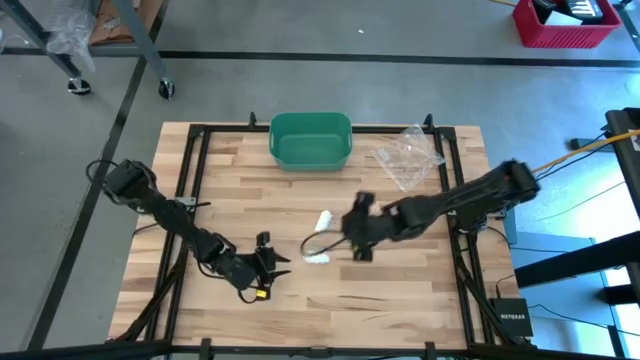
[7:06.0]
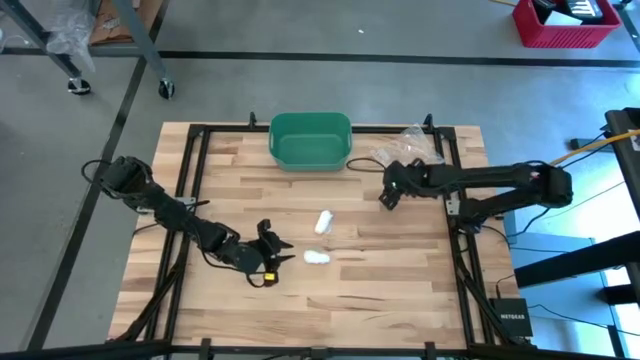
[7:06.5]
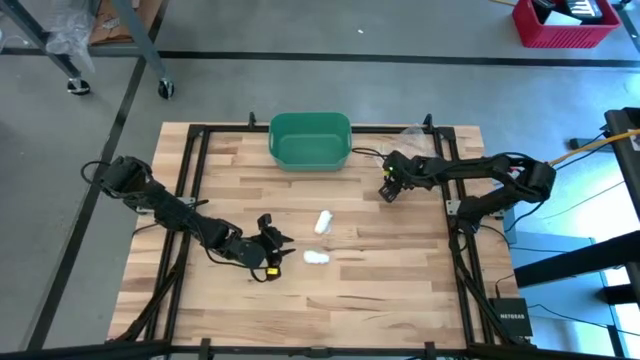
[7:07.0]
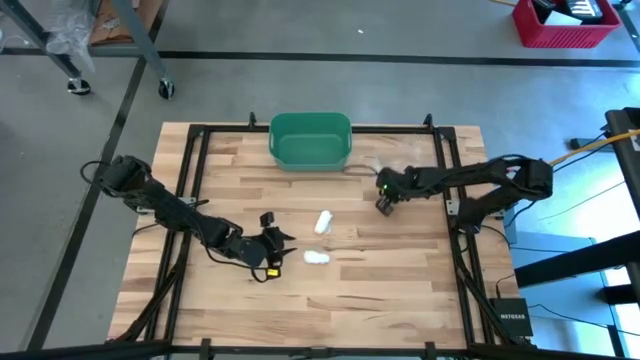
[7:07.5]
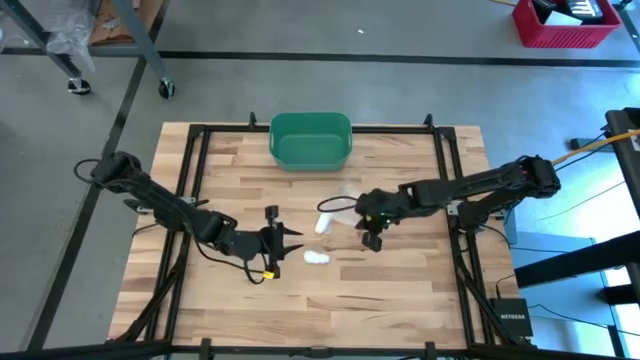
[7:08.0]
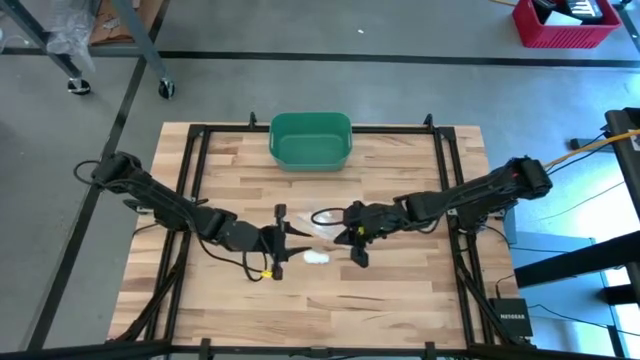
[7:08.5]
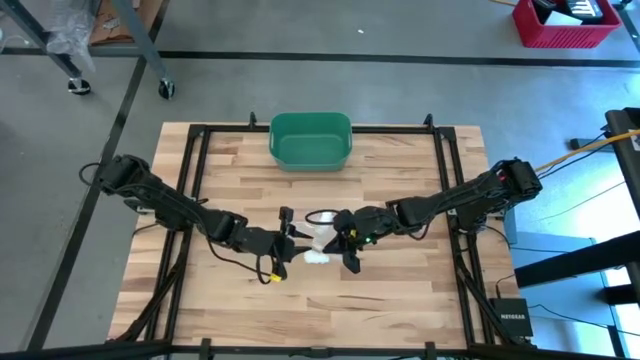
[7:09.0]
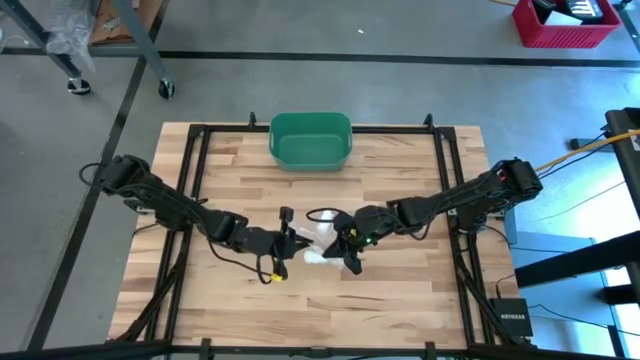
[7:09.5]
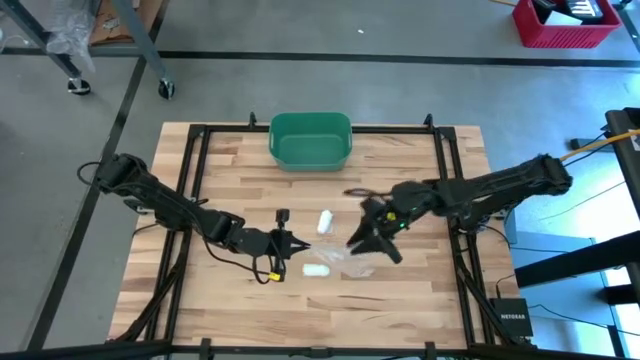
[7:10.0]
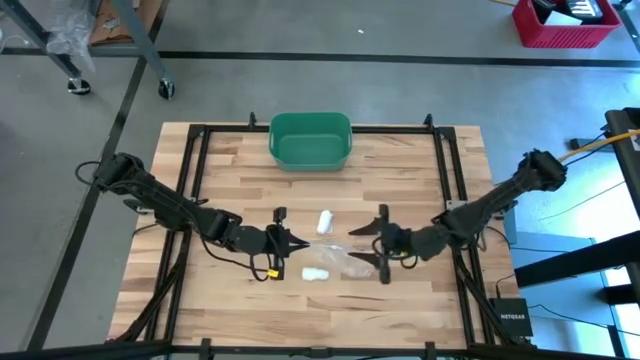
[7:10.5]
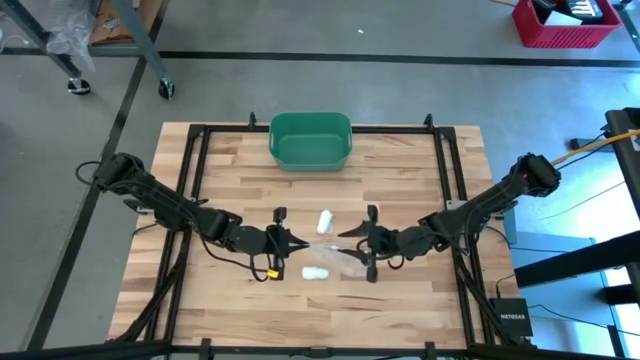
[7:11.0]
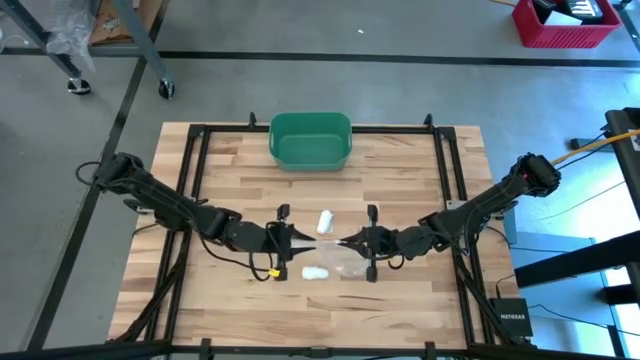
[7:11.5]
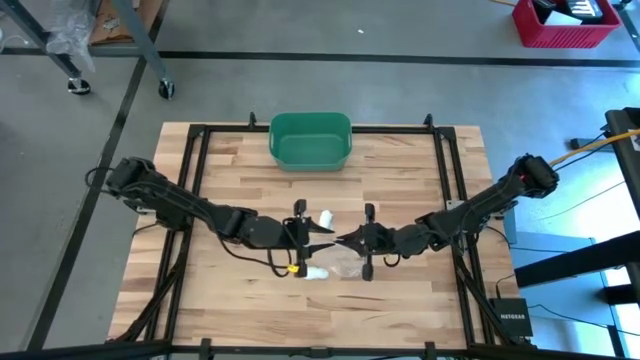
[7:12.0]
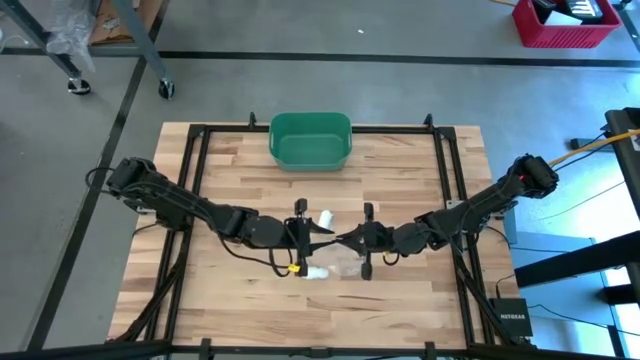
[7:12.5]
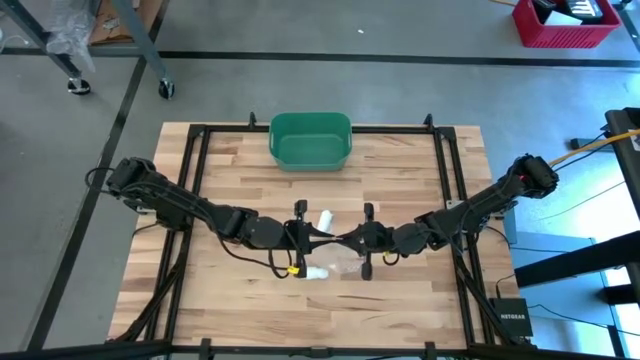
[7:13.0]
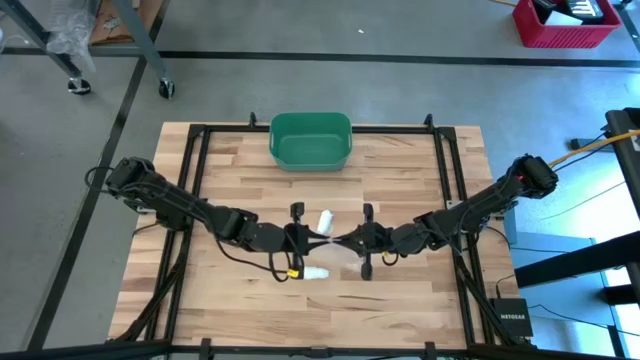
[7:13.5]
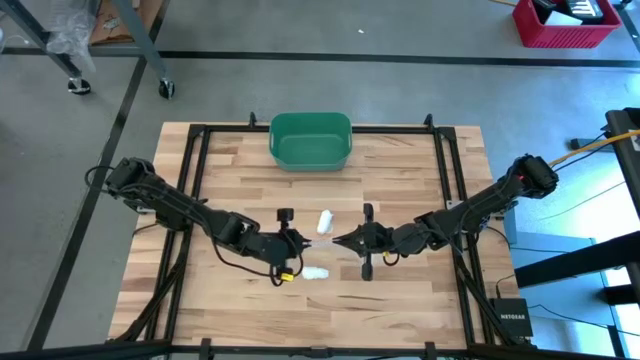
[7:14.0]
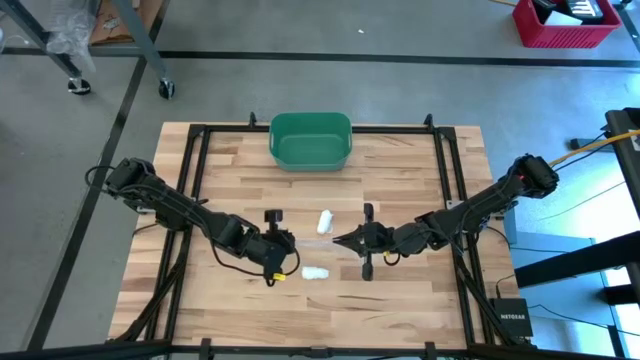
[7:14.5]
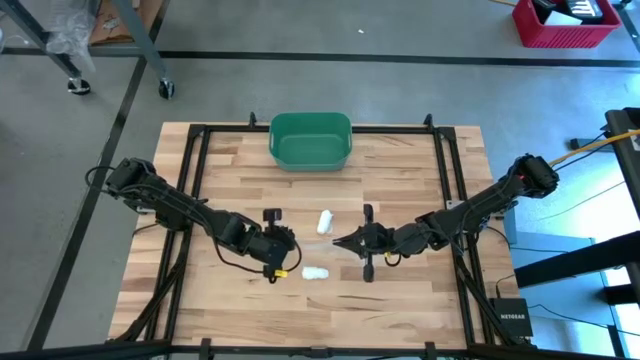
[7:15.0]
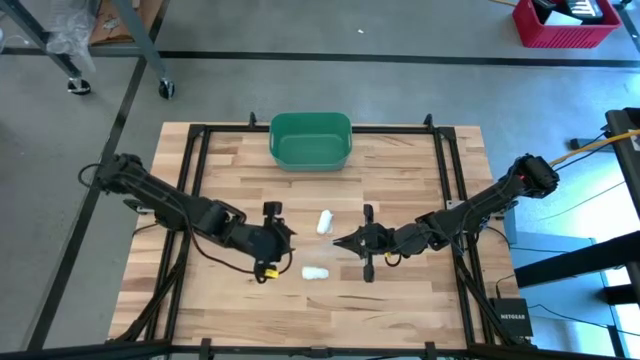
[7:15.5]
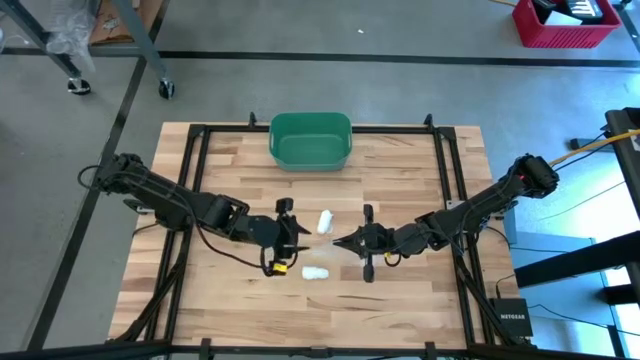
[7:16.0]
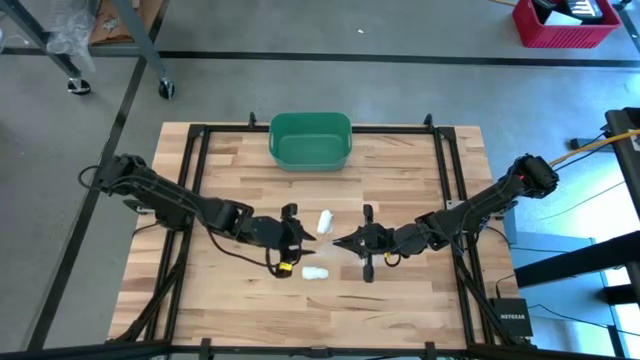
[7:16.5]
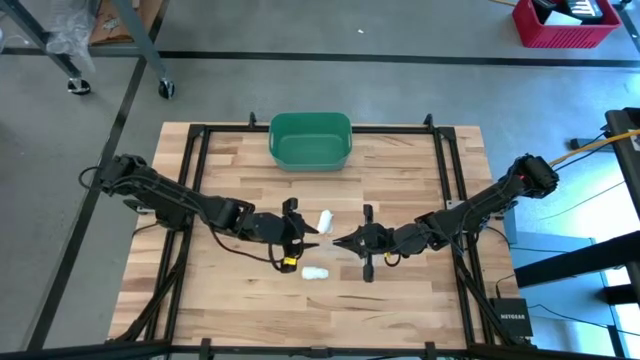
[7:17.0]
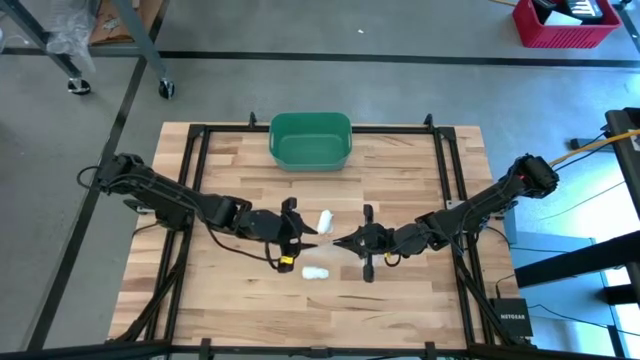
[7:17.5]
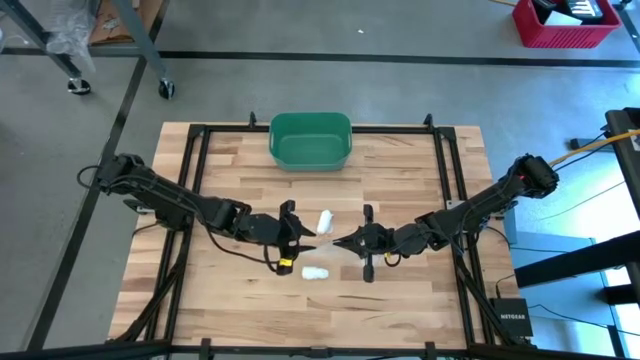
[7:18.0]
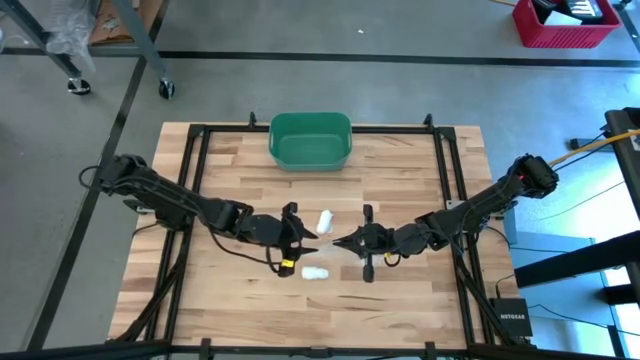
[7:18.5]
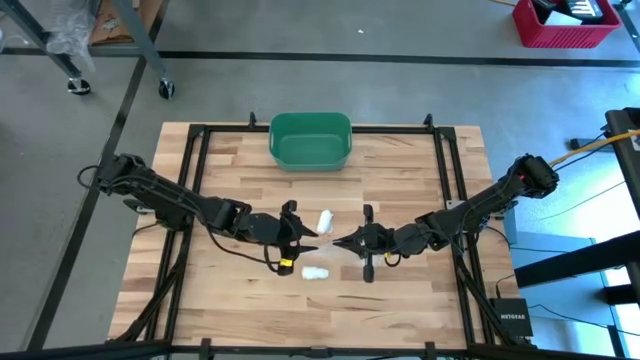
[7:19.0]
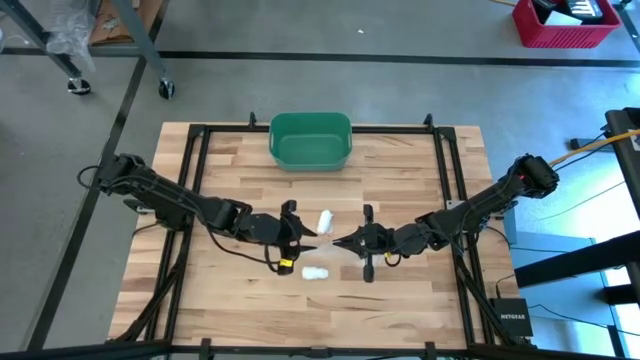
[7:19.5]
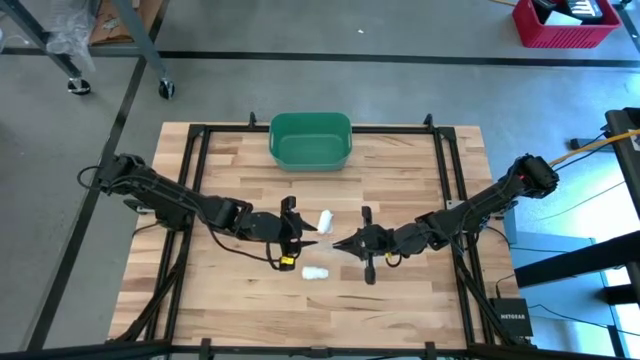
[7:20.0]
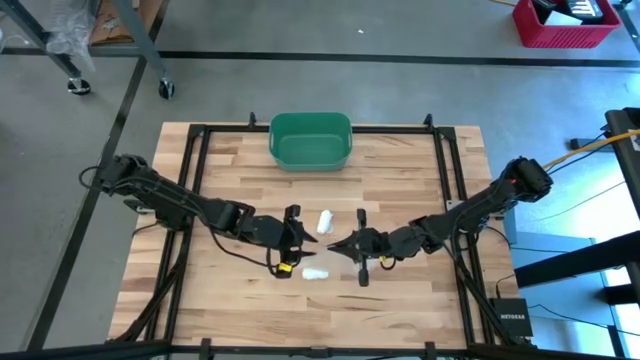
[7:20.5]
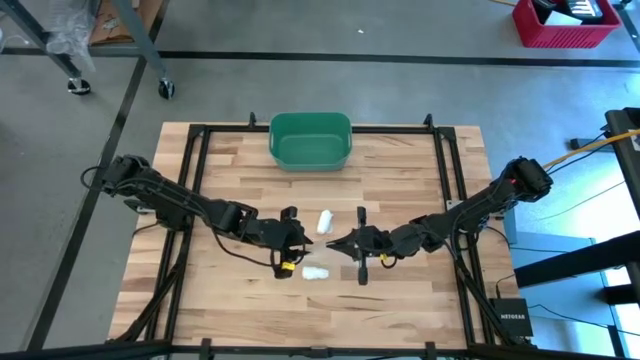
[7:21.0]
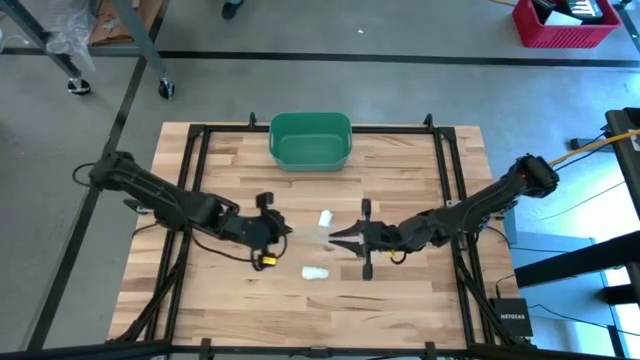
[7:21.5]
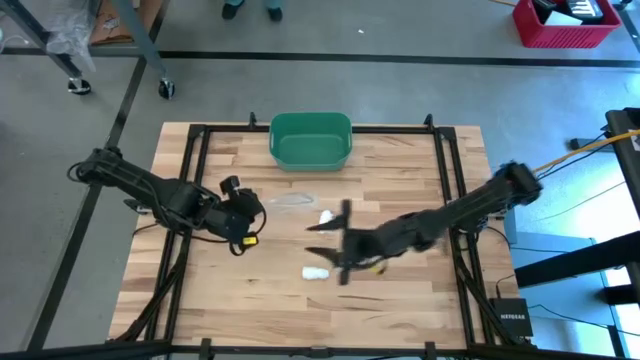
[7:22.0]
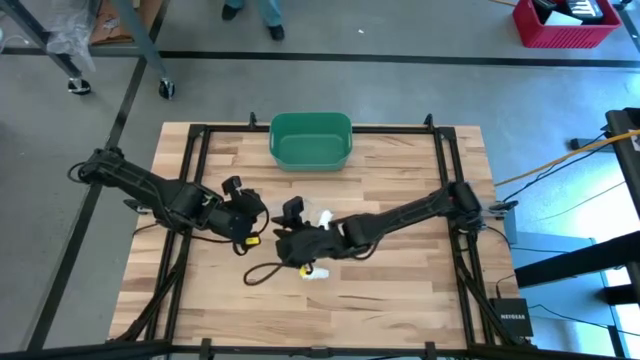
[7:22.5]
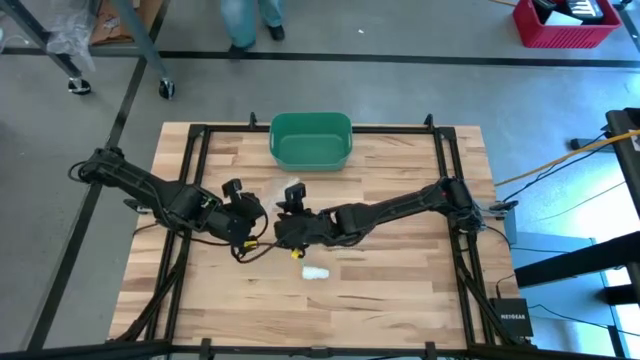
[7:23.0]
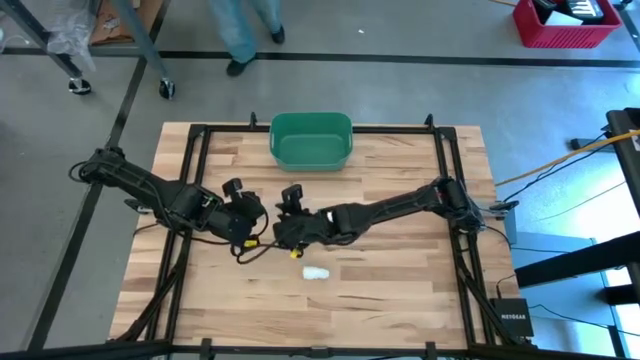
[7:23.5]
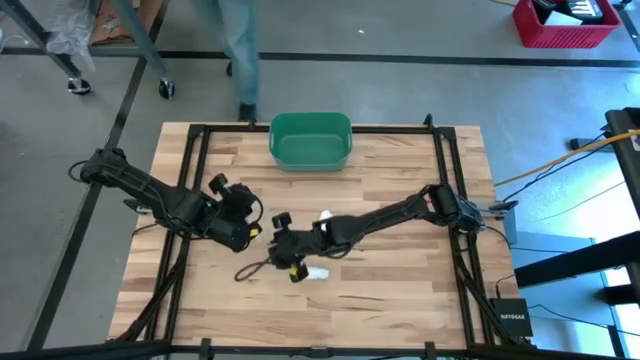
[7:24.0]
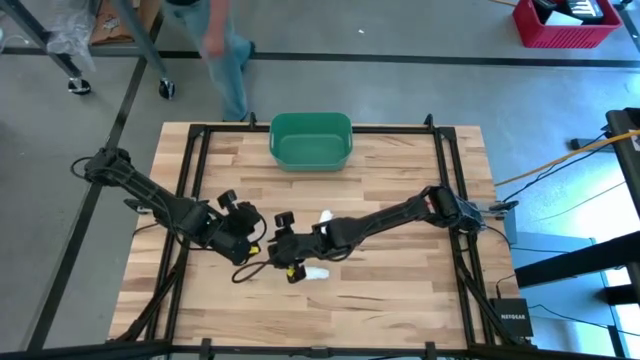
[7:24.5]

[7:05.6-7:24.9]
Task: Roll bandage
Open the transparent zip bag

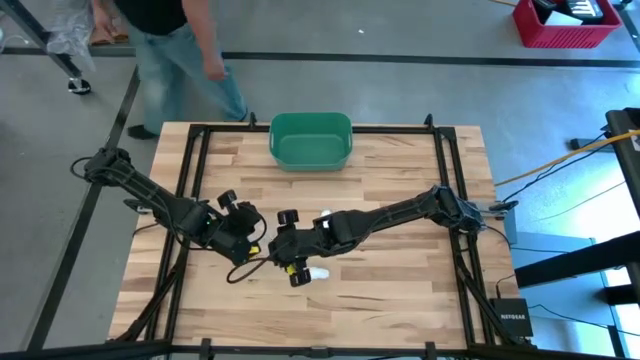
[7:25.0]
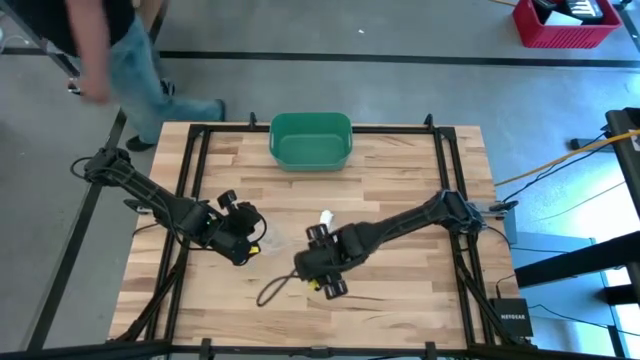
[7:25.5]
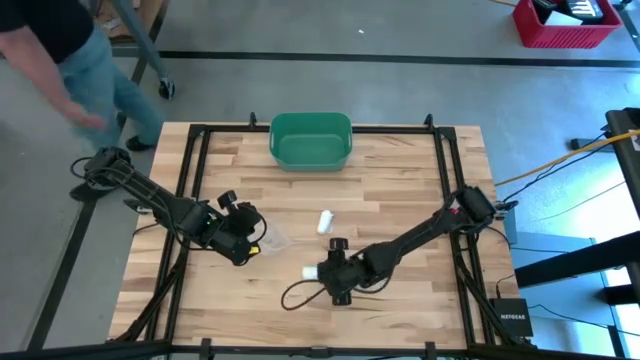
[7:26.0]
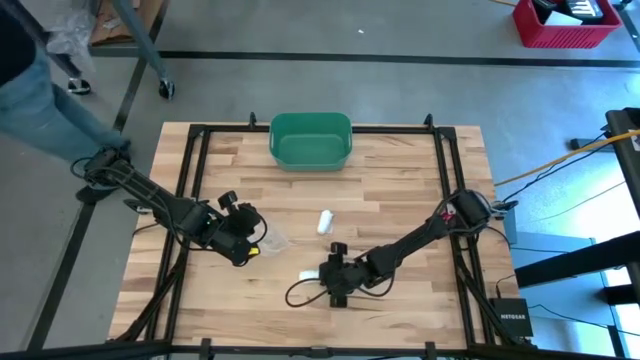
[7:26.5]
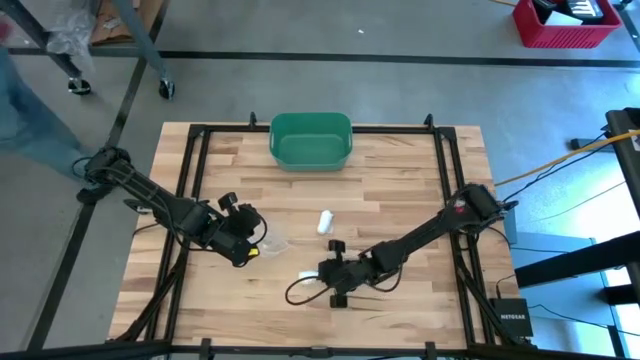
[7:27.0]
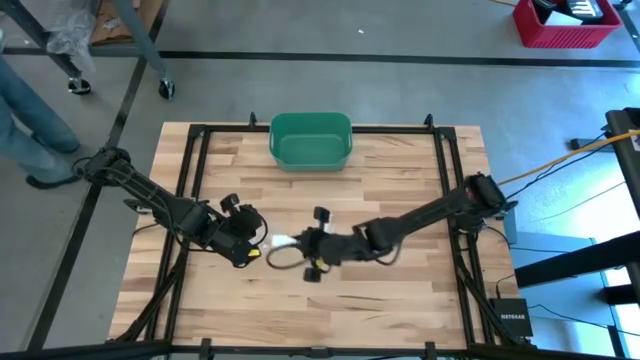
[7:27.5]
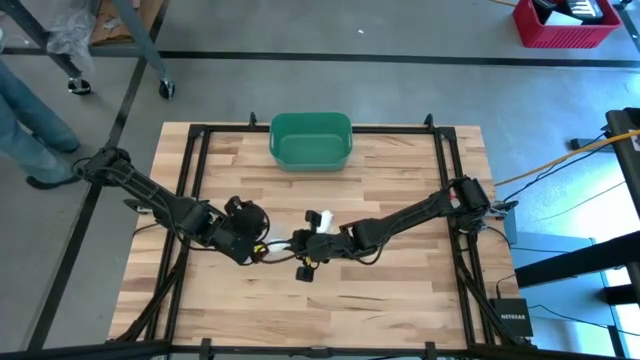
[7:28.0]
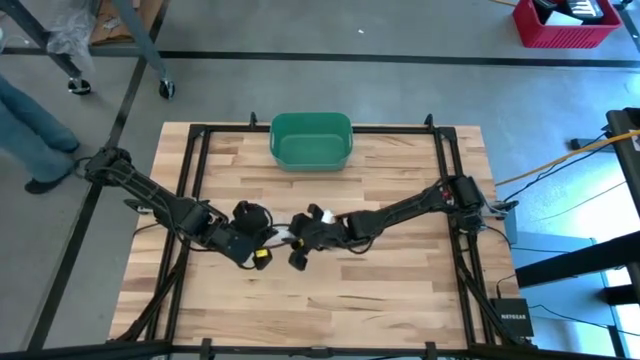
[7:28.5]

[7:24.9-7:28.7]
Put the bottom white bandage into the transparent zip bag
